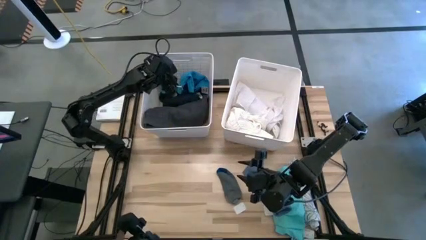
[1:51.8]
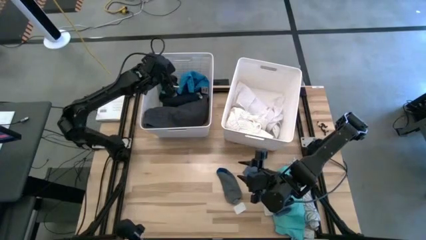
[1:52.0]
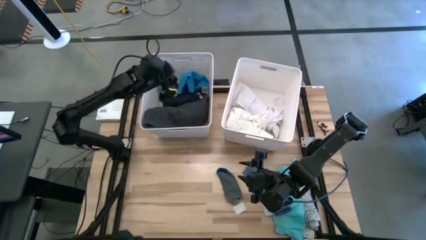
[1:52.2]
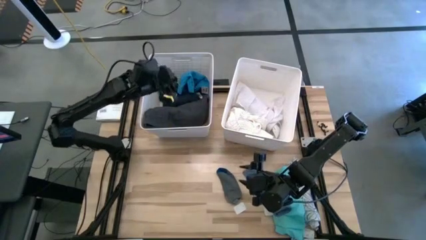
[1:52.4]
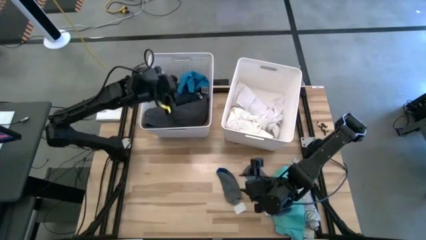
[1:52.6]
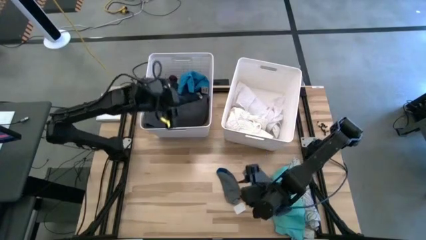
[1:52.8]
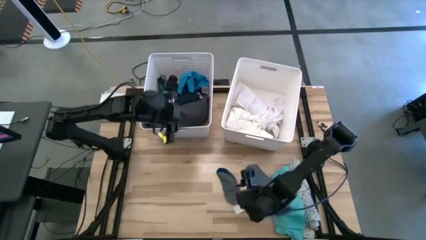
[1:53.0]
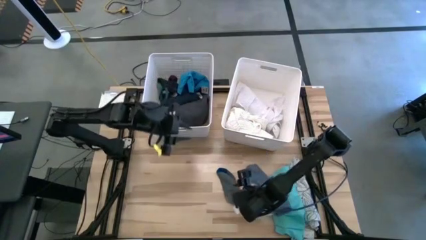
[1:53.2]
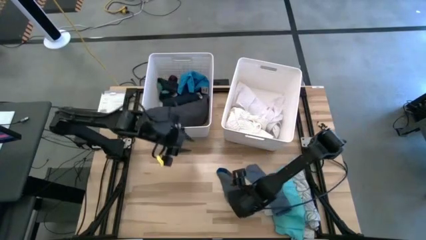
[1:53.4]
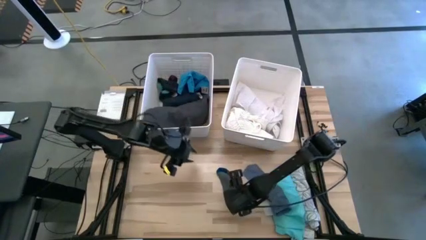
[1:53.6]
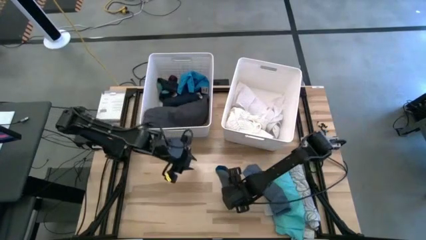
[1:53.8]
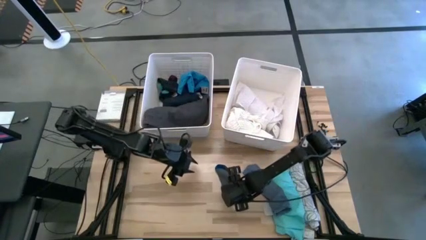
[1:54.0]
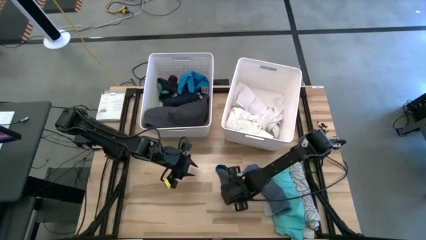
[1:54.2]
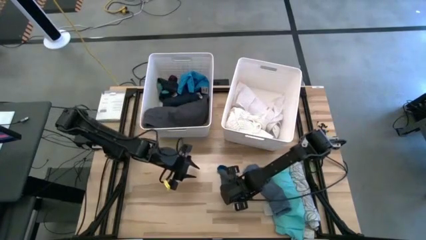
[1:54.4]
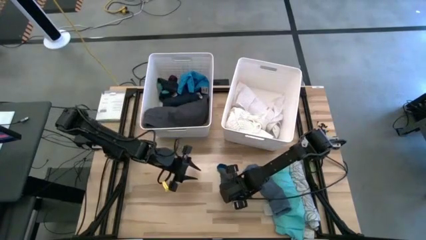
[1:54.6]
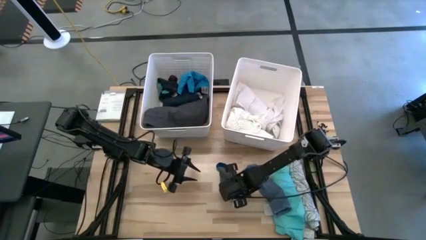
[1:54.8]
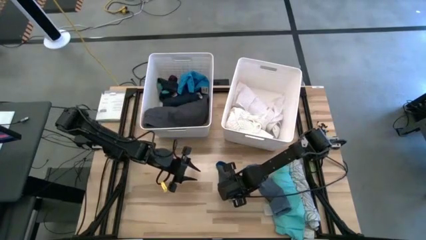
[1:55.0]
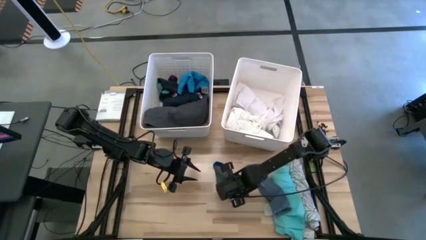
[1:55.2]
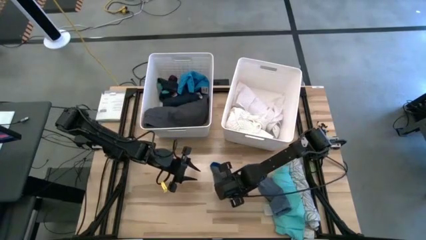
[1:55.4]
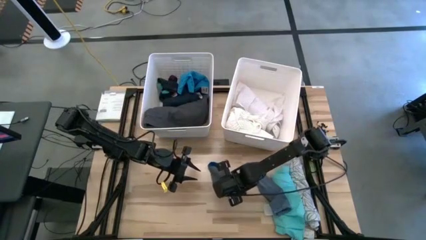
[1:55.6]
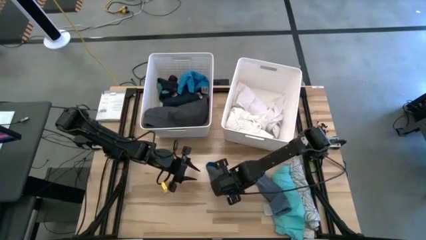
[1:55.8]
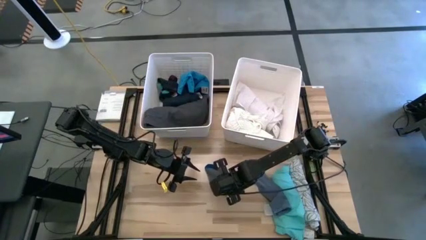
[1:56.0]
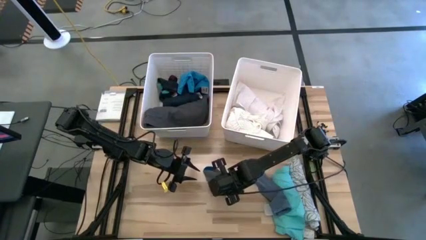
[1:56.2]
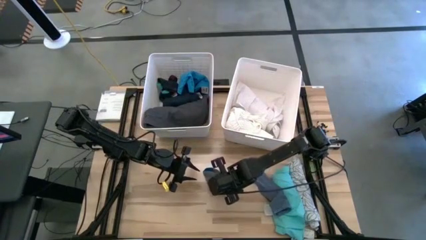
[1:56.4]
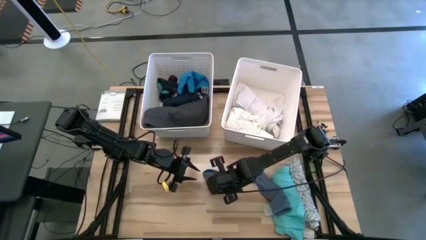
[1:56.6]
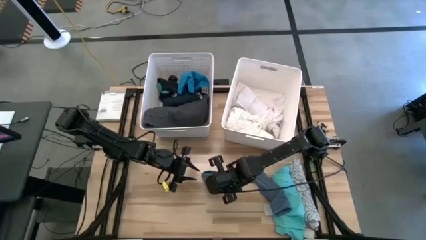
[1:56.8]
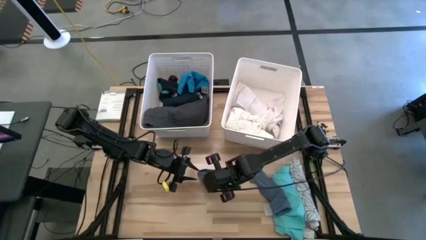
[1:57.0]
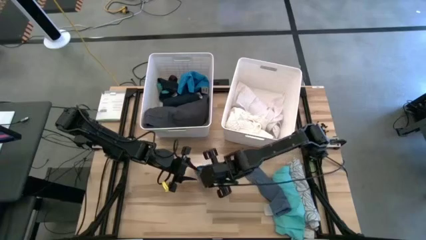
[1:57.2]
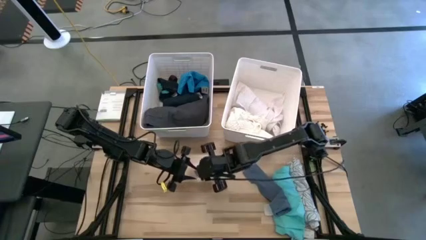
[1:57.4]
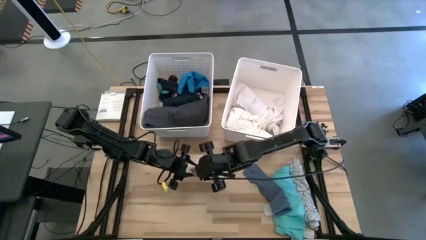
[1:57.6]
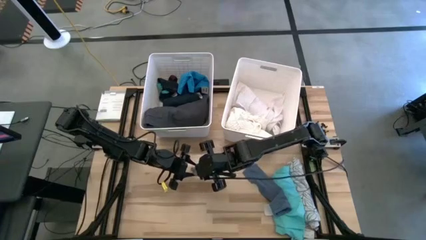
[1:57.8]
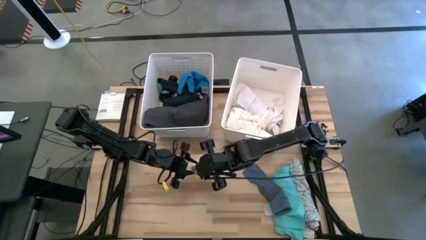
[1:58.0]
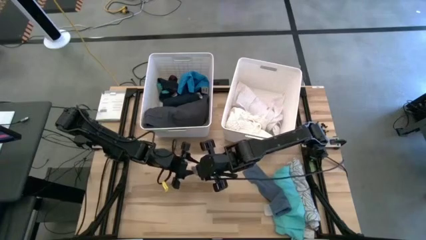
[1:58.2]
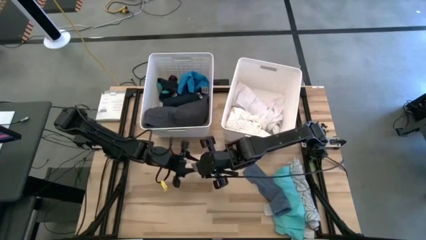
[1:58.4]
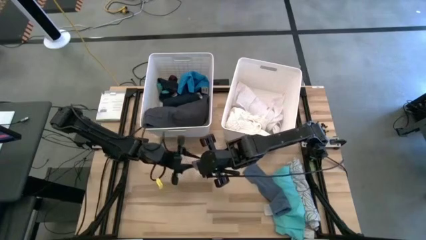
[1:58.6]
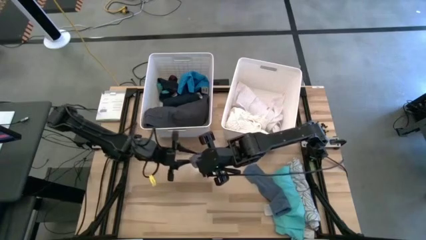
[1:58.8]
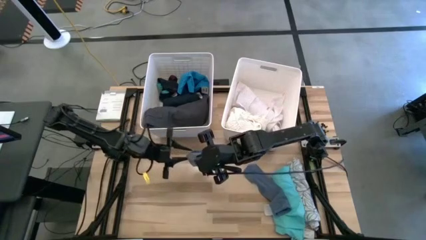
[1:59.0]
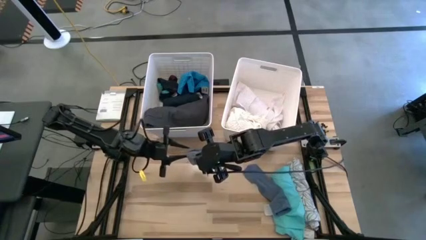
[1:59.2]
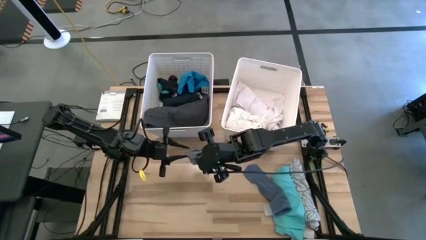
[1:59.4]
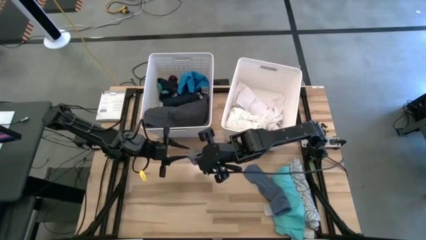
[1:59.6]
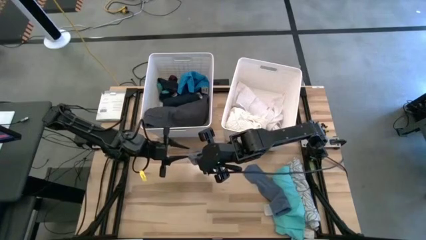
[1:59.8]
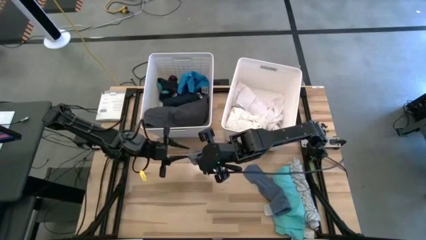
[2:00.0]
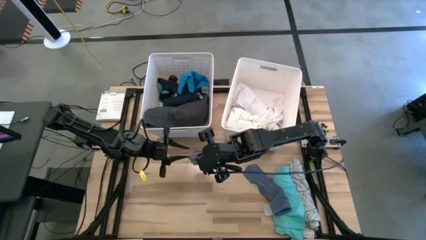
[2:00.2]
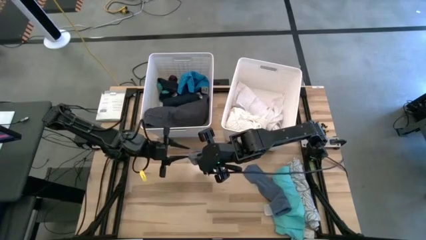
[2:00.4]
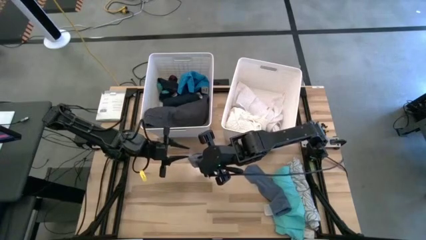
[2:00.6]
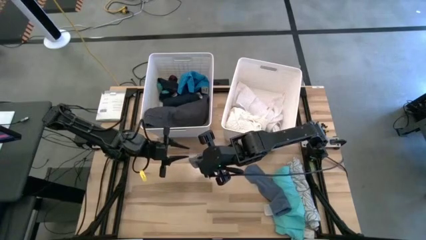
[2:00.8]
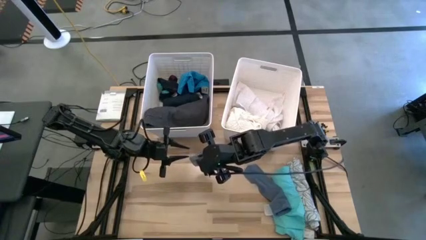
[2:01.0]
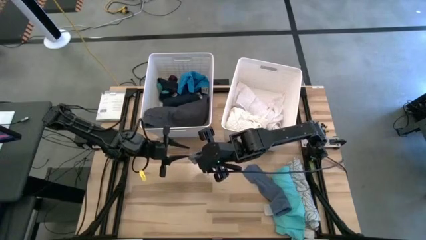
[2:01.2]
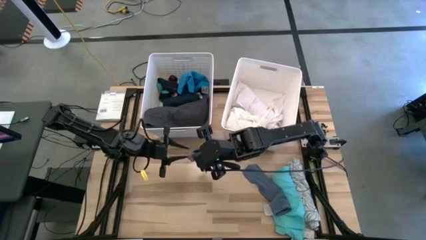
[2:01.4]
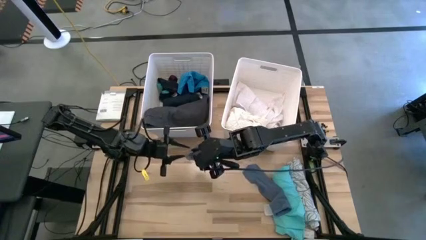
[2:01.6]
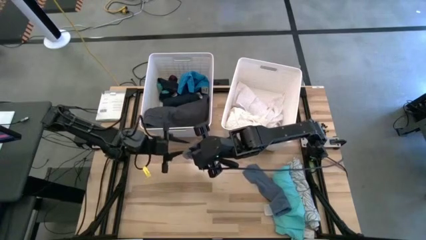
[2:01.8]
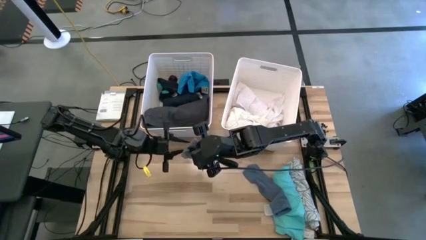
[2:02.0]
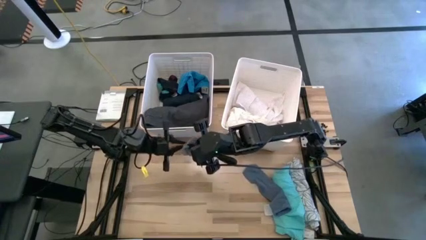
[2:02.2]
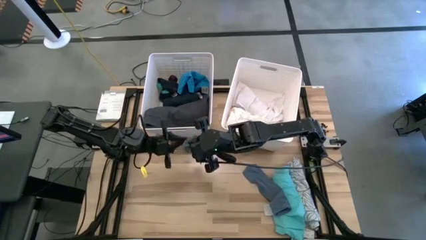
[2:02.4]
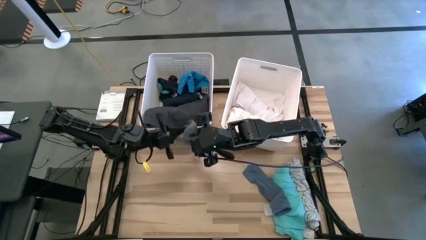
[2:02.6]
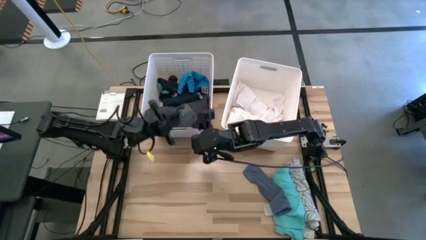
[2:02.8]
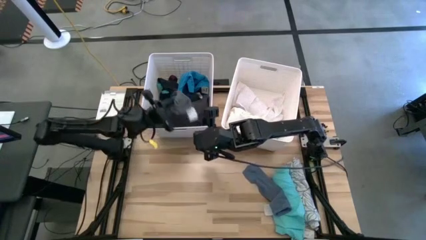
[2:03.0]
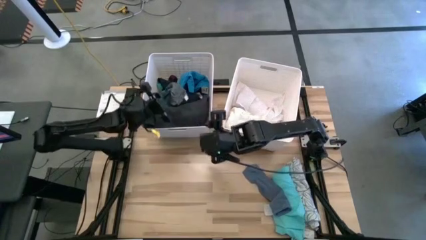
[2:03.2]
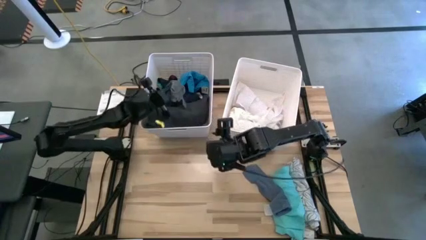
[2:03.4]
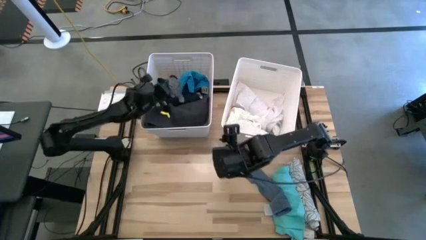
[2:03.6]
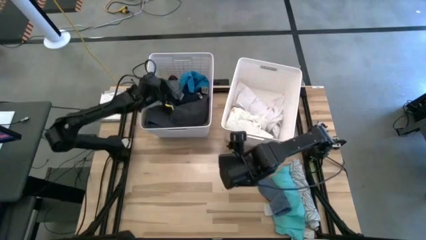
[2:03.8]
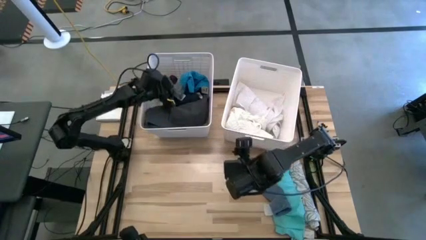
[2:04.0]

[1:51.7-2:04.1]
Task: Sort clothes
Put the gray sock into the left white bin
